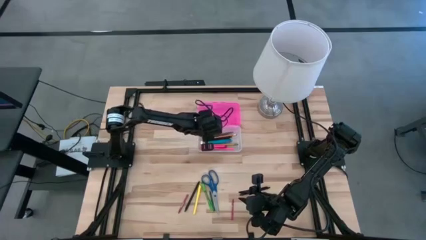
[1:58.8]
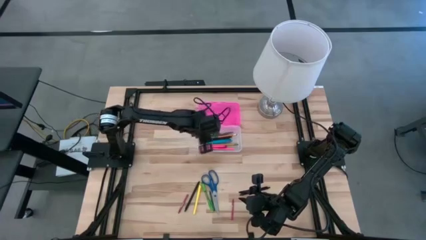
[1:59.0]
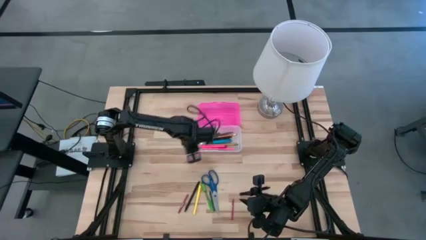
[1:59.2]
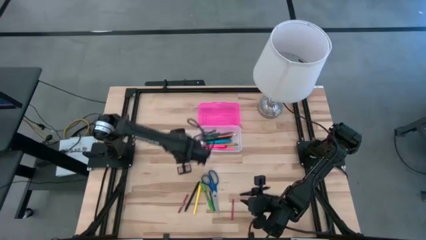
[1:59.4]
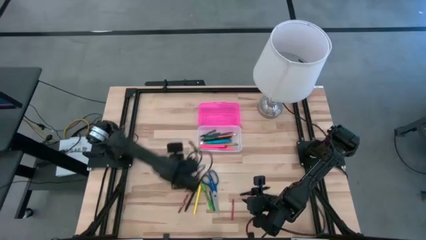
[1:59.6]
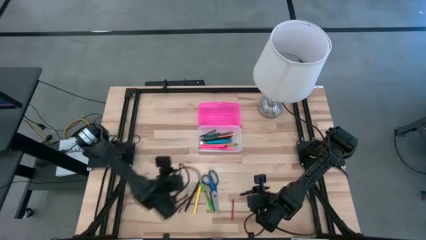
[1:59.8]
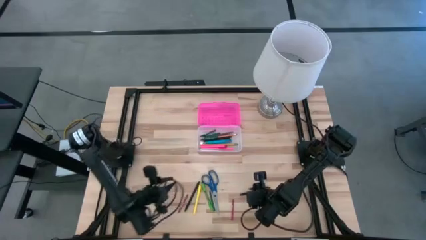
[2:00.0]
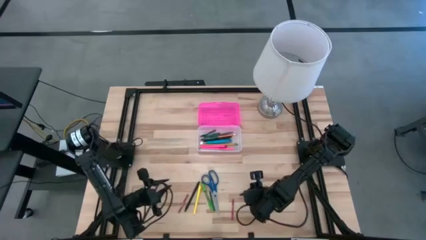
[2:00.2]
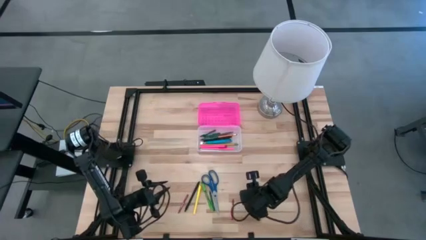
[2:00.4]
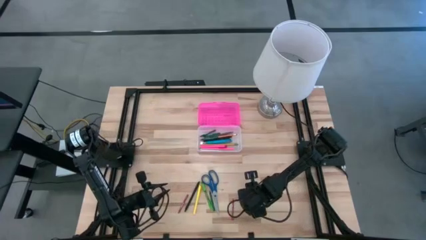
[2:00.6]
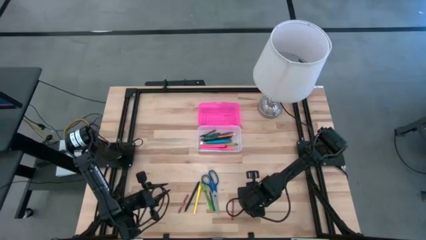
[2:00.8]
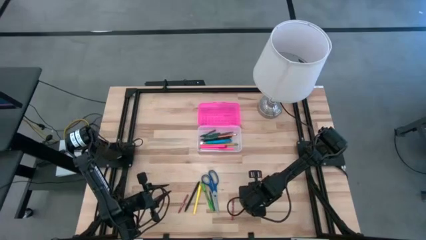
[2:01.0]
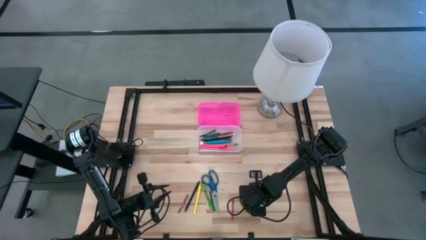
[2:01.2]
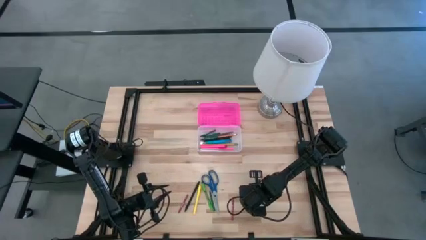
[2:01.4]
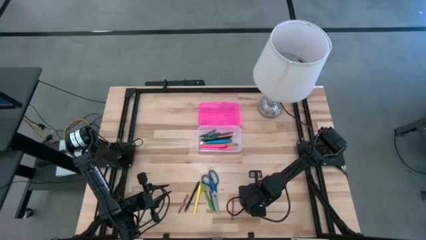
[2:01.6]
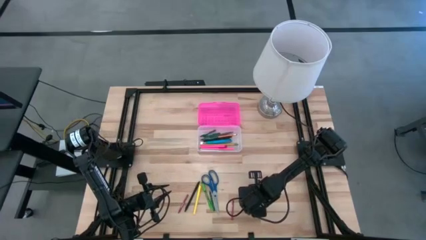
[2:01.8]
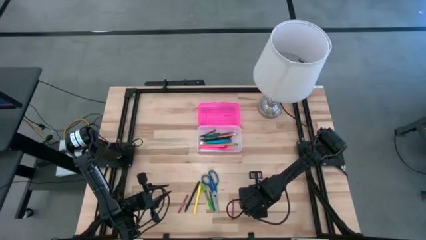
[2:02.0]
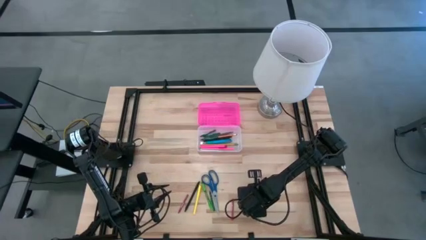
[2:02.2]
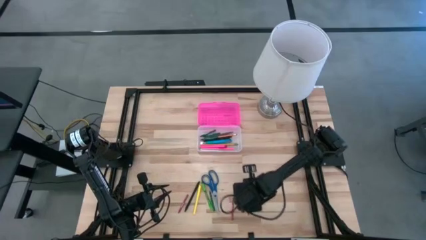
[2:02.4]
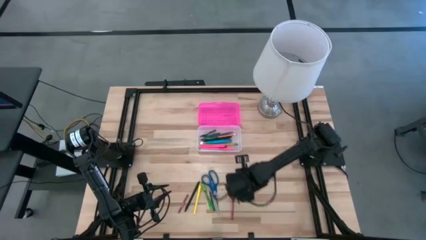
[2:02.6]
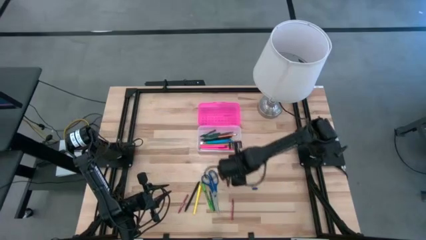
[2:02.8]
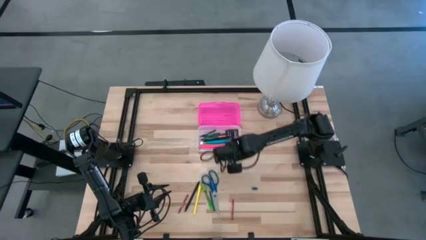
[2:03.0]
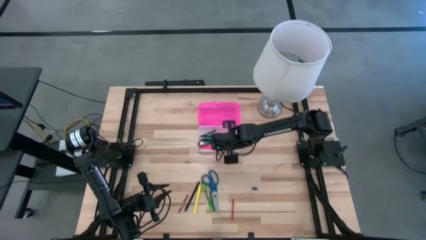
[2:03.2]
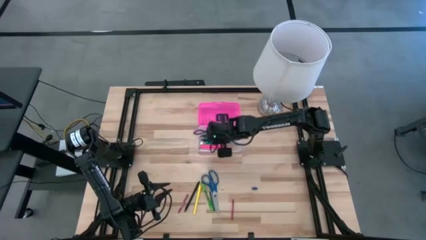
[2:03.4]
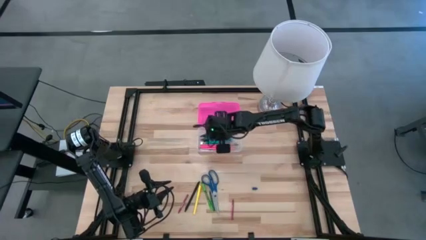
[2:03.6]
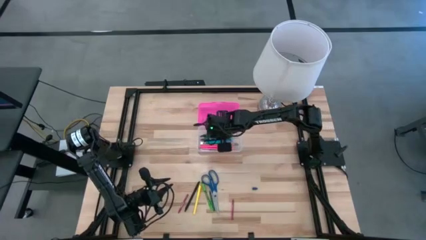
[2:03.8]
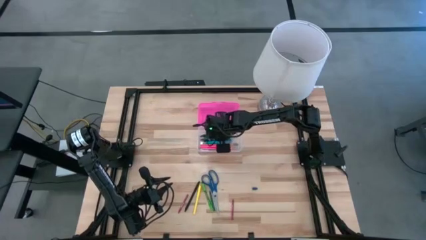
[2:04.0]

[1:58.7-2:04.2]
Task: Pick & place school supplies into a supply box
Put the right black pen into the supply box

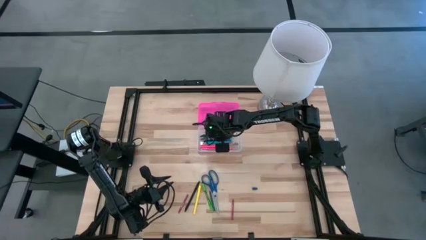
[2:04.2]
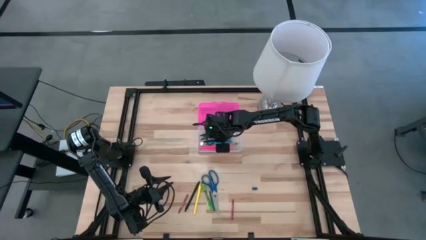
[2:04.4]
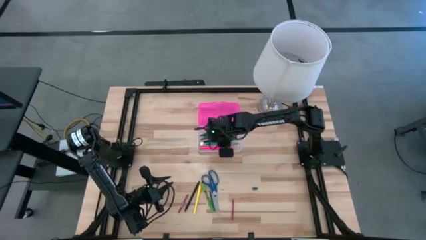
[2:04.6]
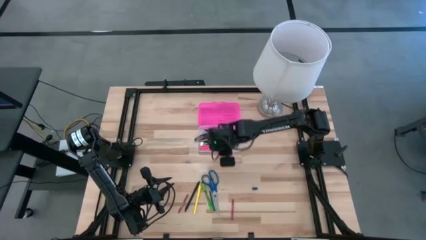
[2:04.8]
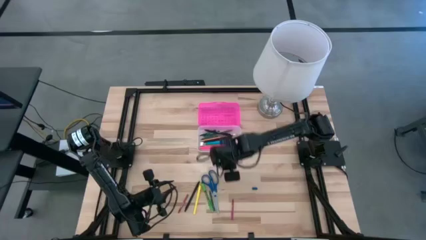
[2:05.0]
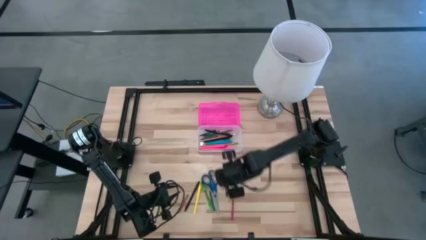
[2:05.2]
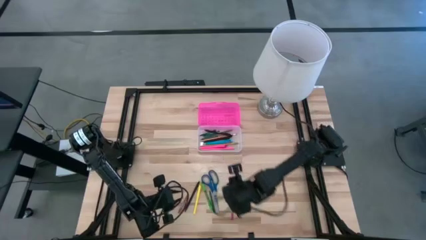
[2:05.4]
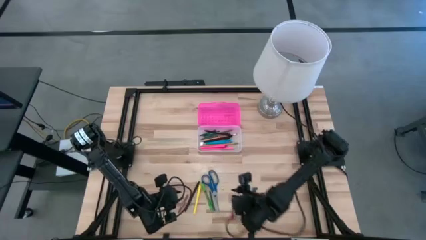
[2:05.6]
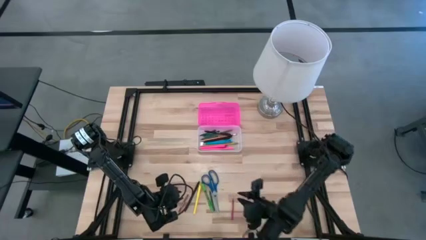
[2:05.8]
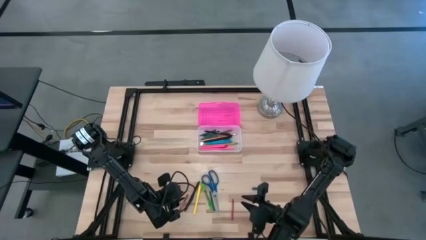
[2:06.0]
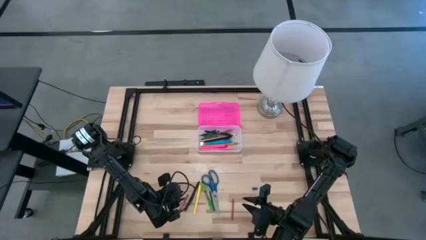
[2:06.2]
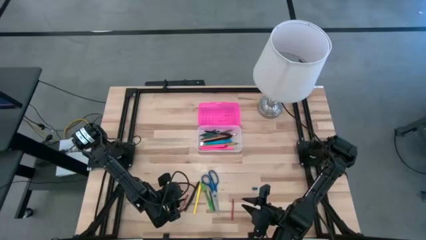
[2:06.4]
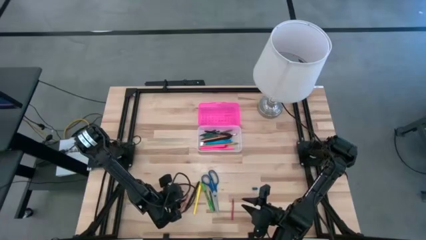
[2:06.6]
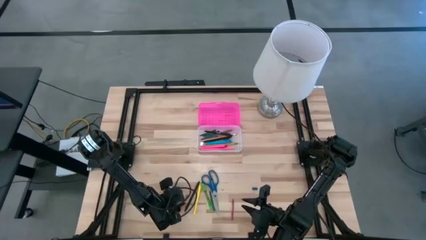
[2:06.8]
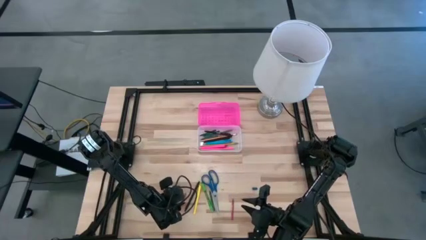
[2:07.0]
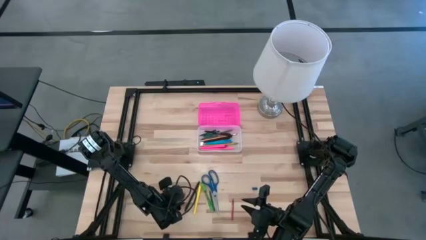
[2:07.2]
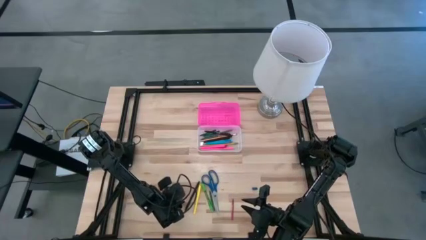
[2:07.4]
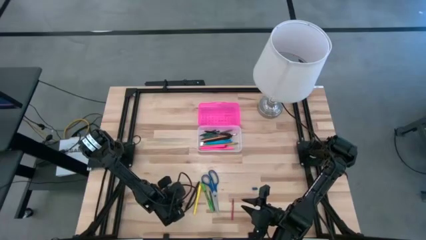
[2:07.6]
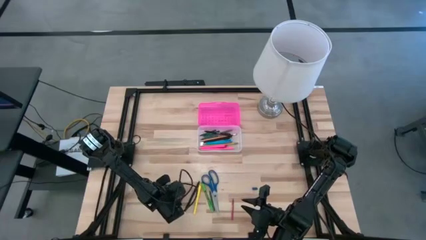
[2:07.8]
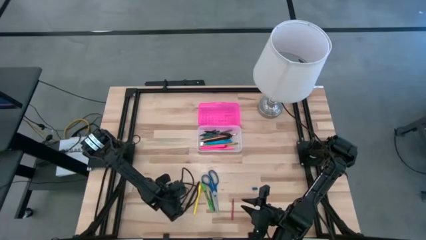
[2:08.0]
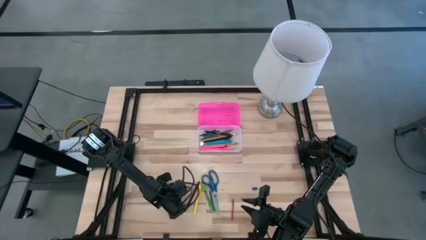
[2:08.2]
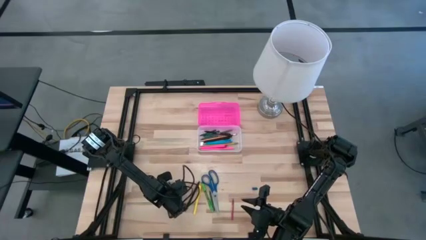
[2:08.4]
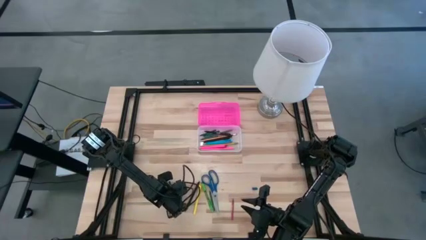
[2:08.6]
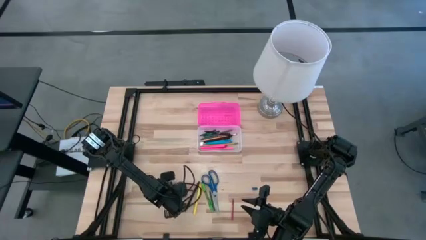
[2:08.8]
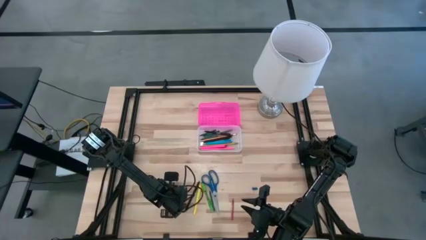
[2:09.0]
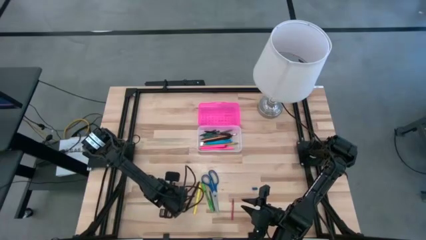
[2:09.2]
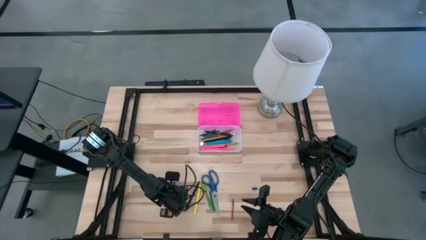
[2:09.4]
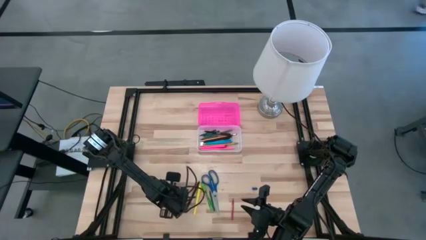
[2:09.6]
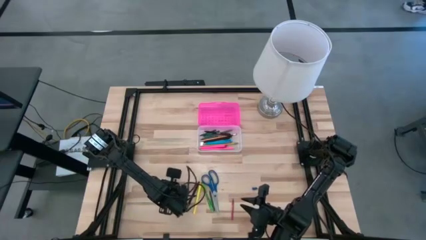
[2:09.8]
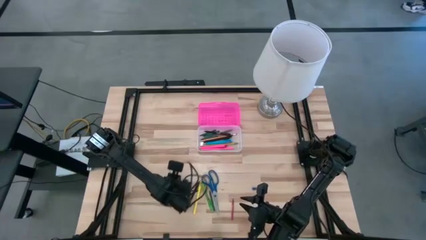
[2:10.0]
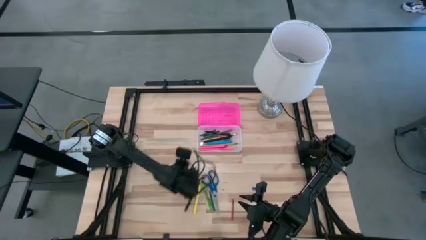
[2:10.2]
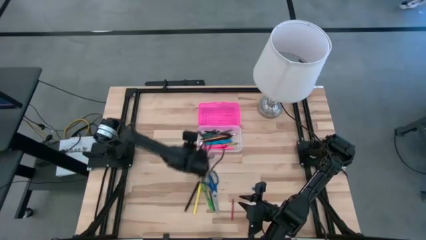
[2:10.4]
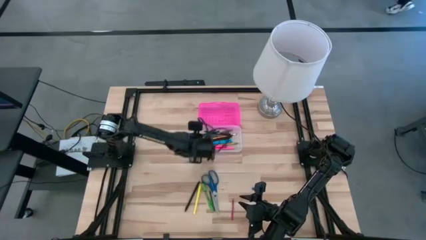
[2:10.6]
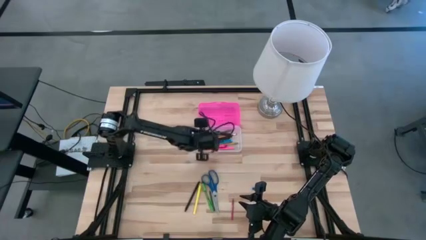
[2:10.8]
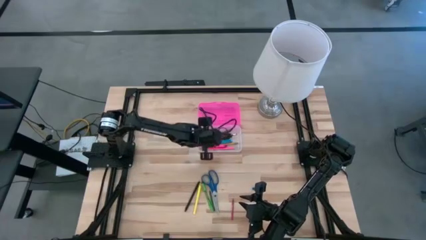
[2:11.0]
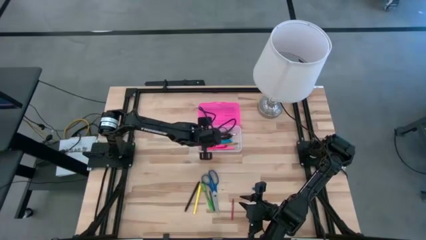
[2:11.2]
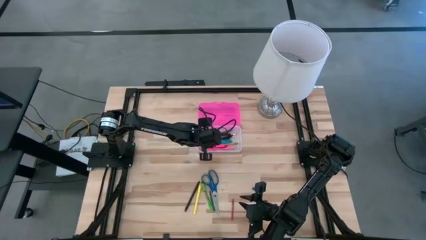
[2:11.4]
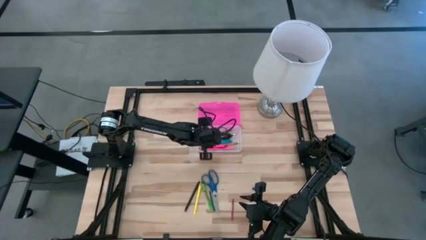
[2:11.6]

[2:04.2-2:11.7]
Put the left red crayon into the supply box

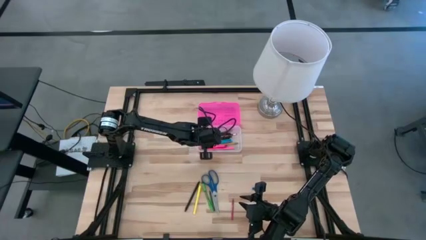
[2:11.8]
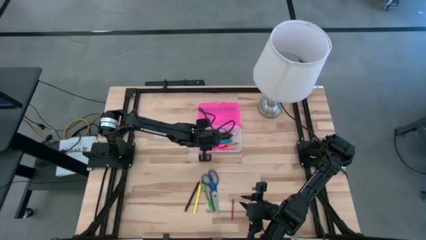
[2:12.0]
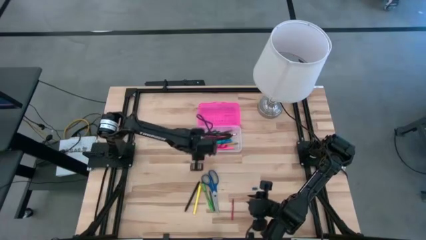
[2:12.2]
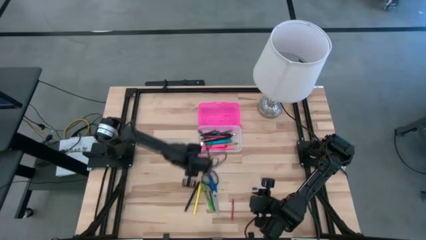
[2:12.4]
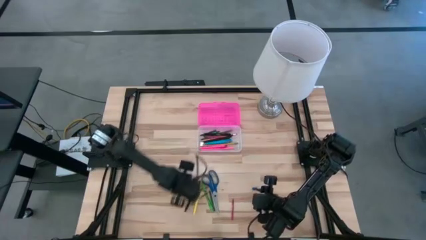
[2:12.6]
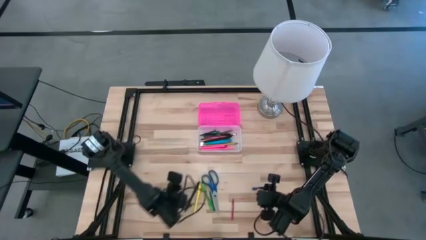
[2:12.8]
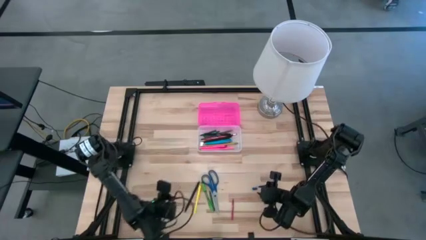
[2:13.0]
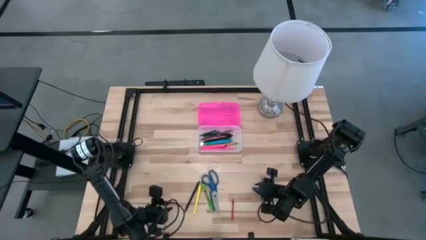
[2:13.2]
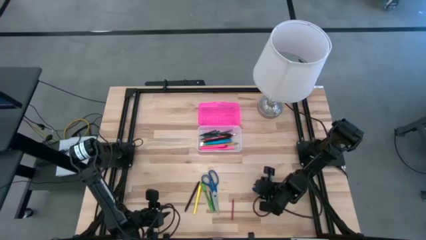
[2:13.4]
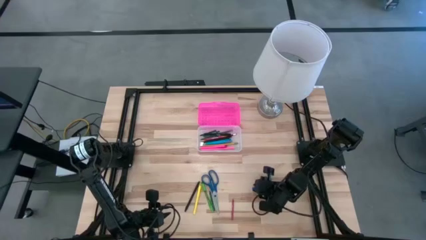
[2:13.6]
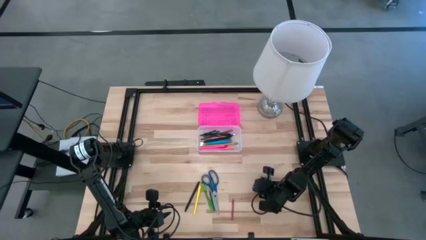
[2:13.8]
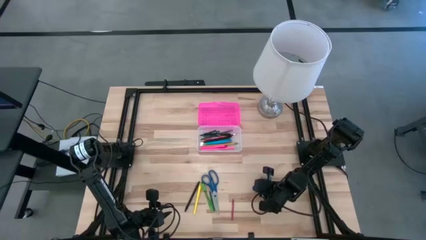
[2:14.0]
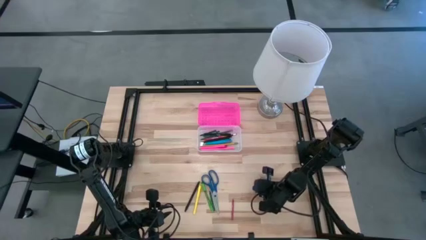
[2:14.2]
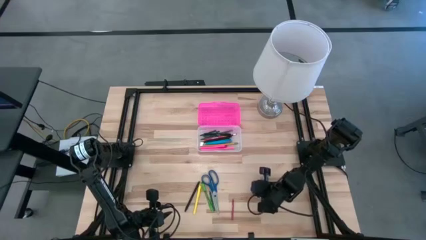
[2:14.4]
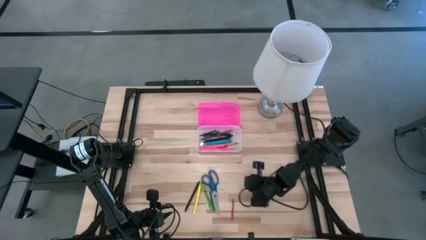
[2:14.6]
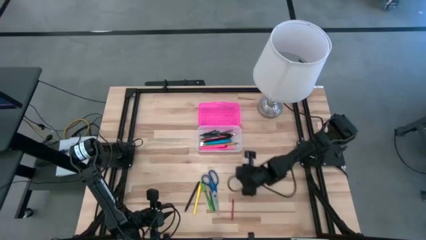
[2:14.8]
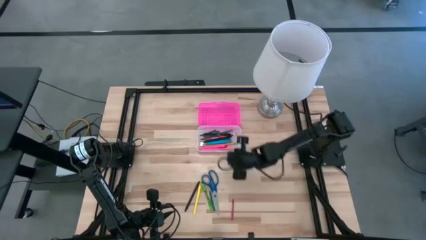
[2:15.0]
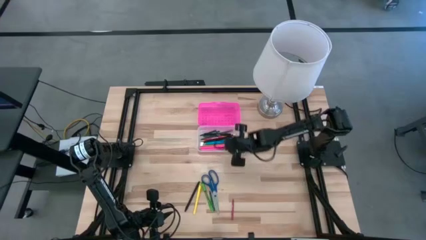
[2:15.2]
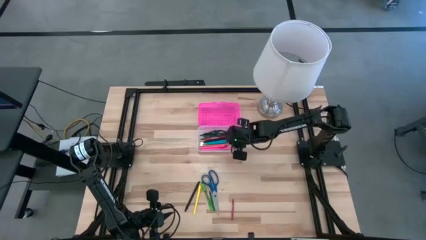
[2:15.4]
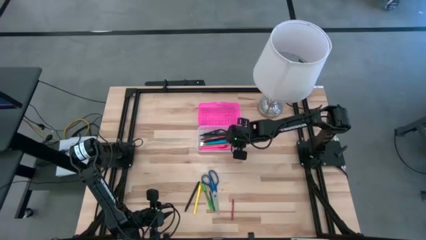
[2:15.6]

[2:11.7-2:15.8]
Put the blue eraser into the supply box
